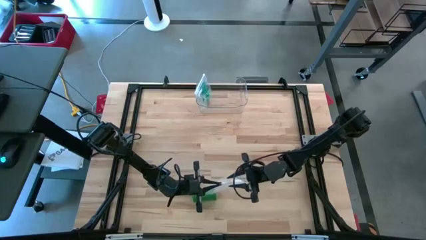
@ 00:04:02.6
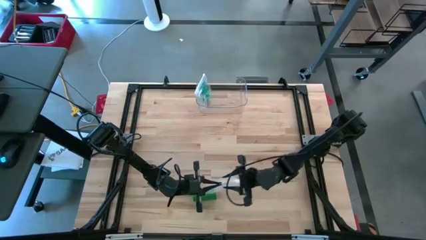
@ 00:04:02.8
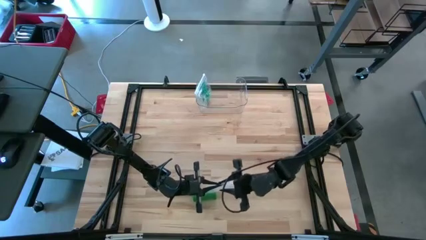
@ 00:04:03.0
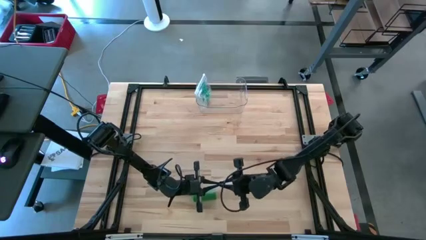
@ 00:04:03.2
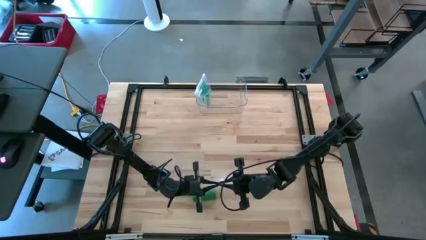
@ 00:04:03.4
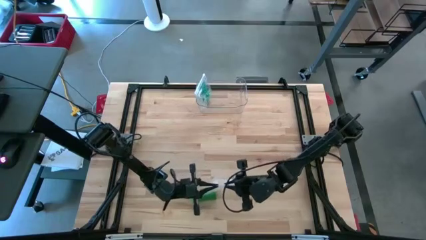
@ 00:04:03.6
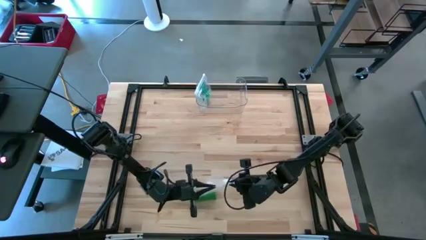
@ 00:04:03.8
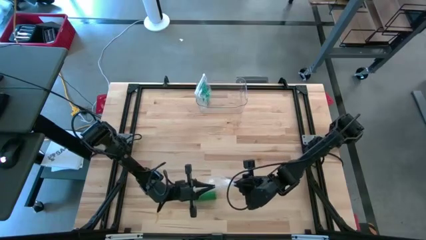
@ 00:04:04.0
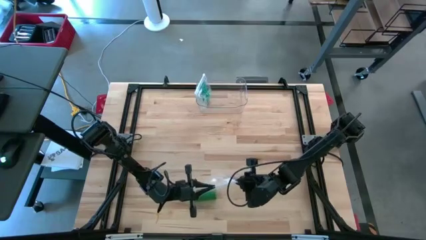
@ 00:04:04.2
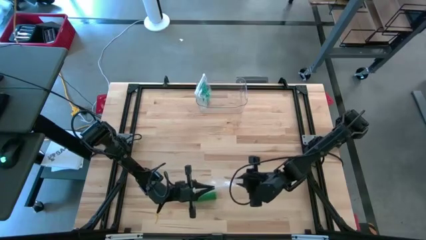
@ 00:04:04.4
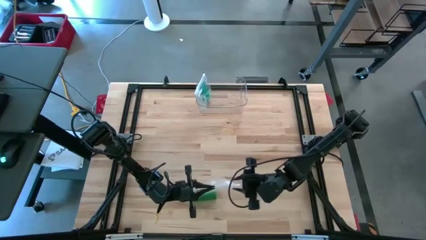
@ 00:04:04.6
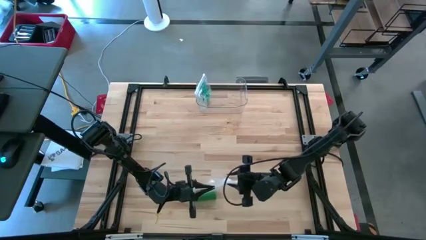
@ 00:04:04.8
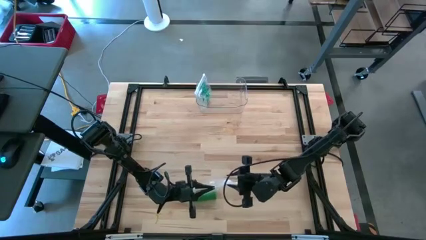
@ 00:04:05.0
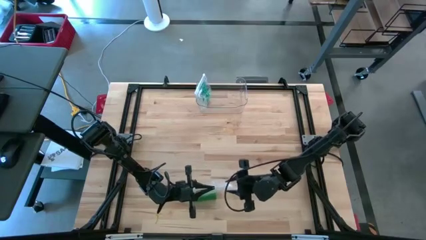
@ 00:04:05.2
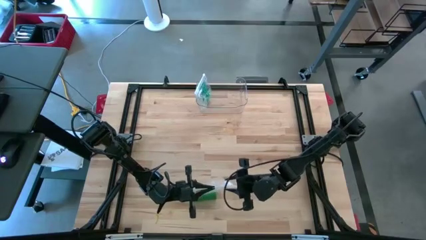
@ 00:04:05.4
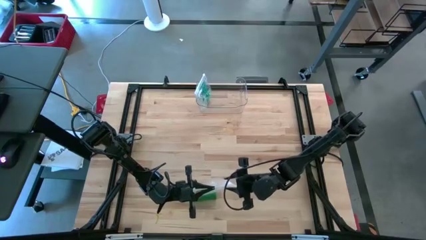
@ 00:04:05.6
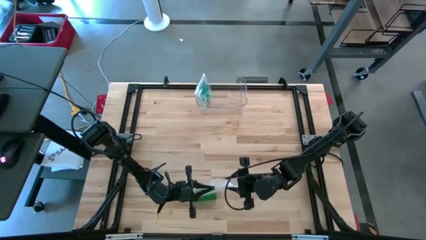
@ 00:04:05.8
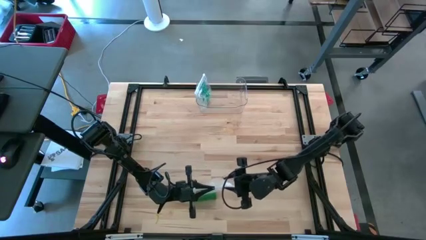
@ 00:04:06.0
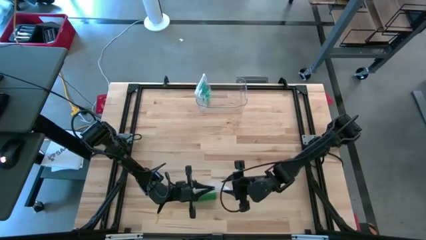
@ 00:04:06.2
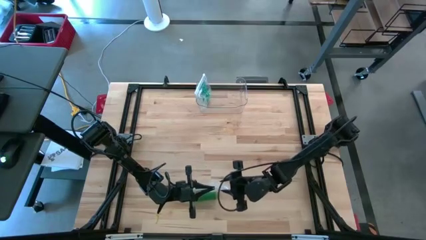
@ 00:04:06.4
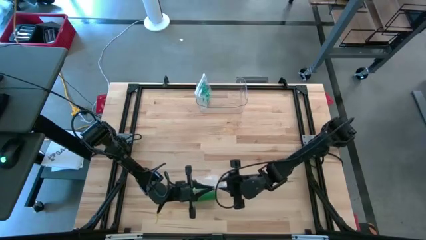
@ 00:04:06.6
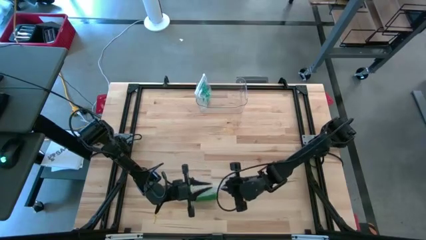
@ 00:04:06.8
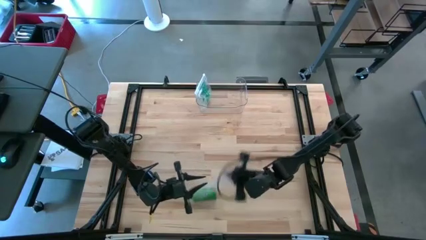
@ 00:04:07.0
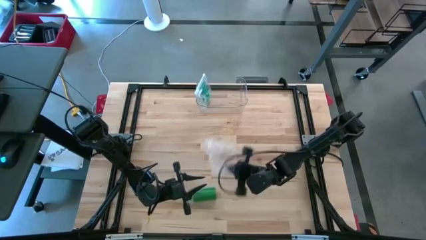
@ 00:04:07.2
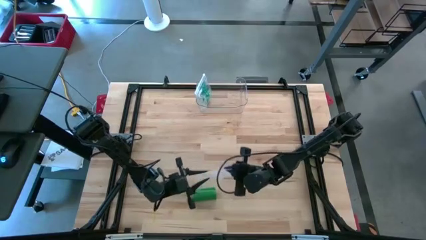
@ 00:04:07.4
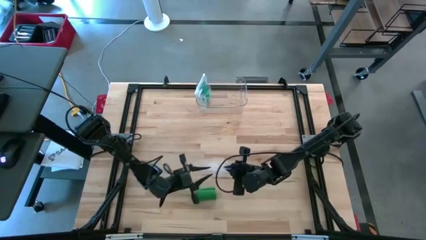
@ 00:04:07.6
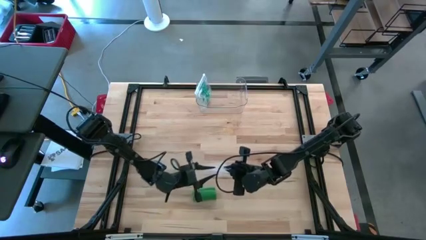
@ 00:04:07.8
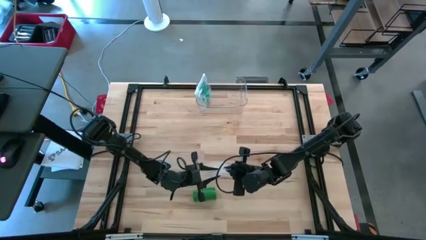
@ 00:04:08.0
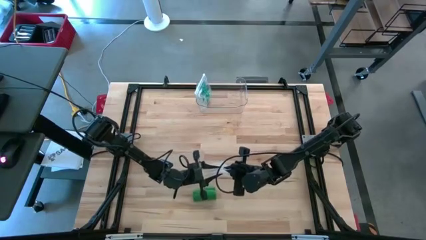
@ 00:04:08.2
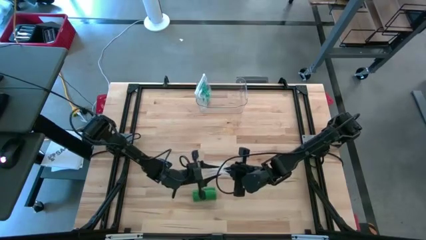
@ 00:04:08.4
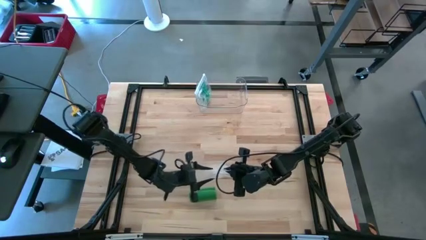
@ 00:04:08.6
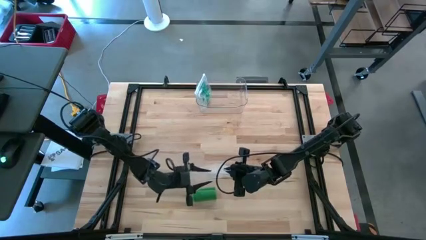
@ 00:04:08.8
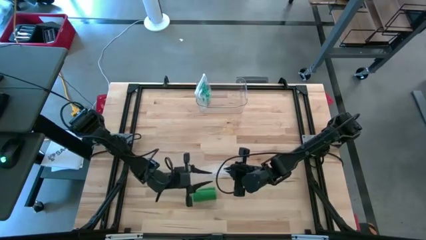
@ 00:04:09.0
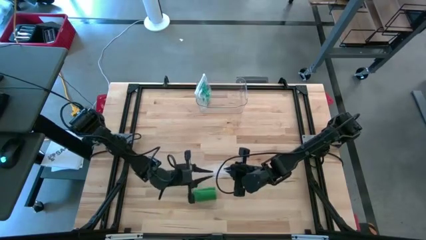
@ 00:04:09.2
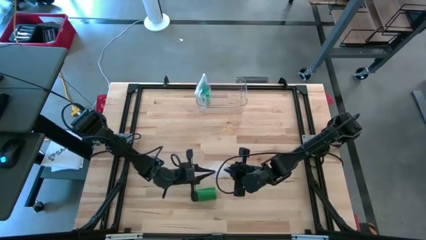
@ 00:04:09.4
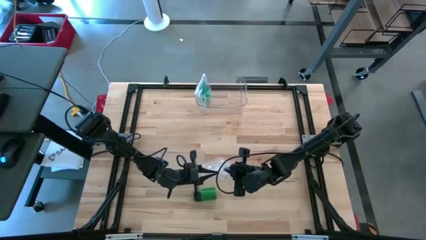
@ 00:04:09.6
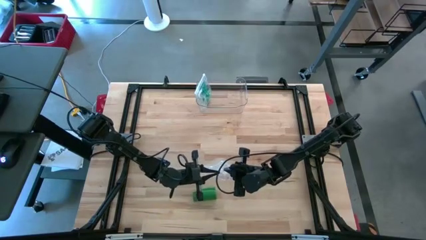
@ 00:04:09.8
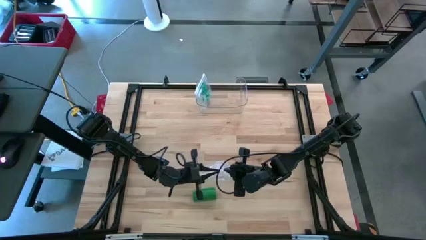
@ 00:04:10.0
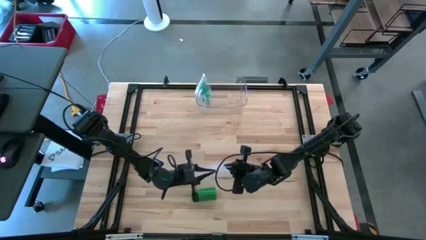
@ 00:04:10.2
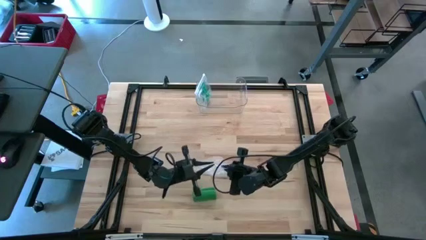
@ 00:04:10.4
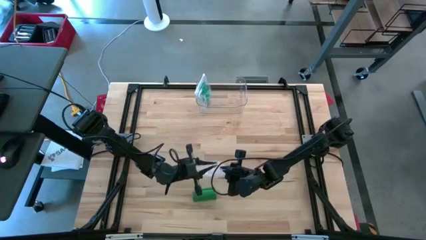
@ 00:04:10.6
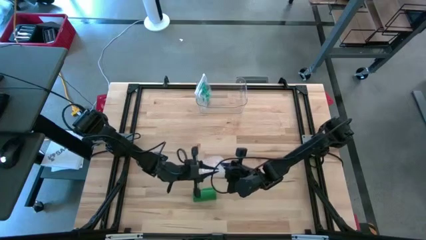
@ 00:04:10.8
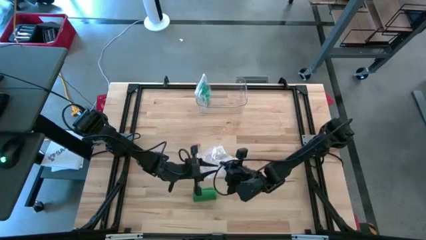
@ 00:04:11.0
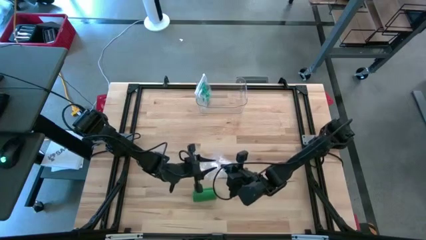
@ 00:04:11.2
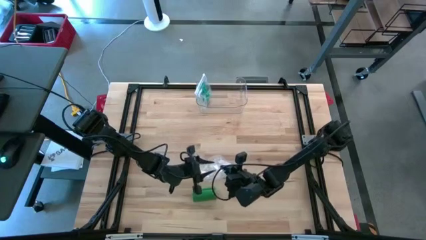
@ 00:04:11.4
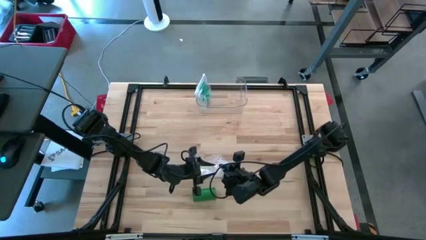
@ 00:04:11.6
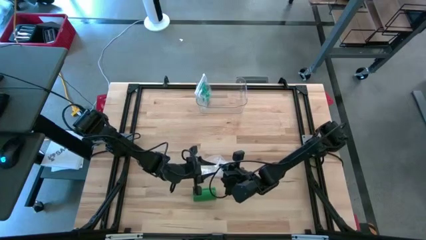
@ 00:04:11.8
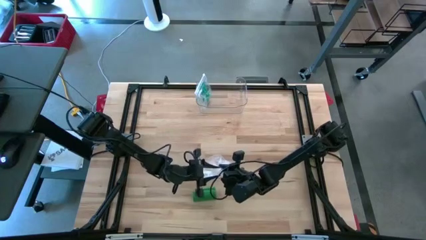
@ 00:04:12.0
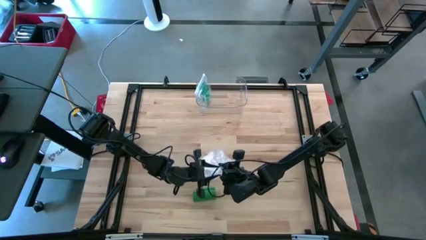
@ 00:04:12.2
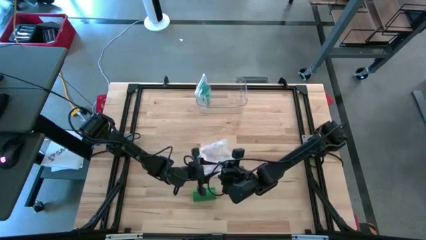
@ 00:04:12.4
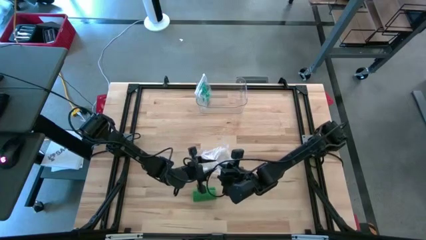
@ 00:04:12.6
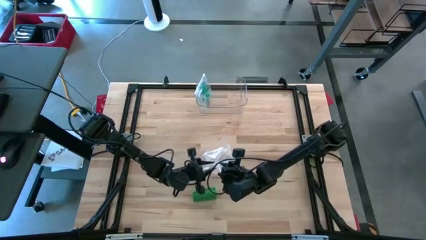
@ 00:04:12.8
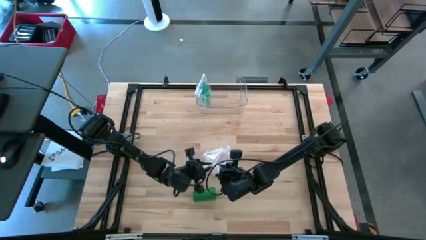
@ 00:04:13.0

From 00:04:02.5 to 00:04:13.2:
Task: Roll bandage
Open the transparent zip bag

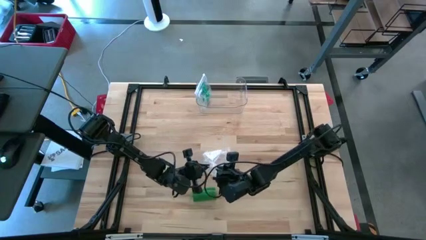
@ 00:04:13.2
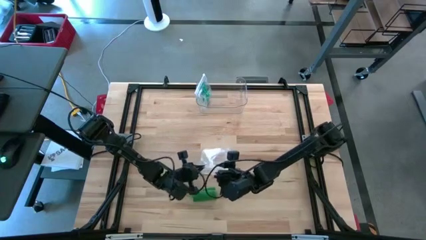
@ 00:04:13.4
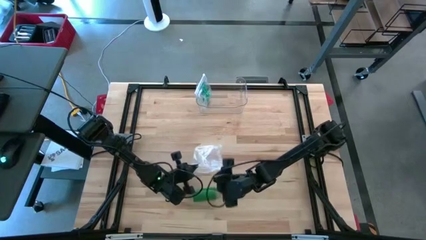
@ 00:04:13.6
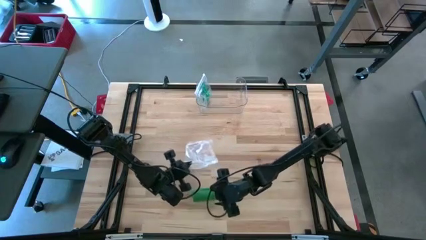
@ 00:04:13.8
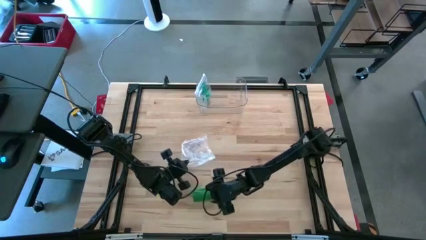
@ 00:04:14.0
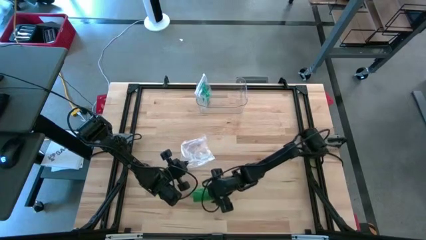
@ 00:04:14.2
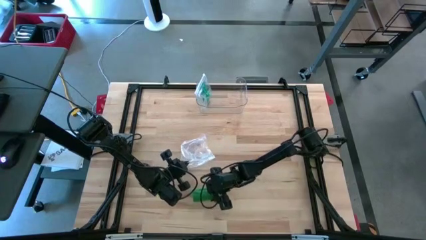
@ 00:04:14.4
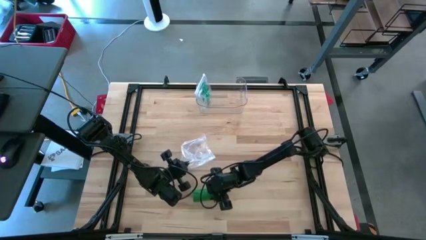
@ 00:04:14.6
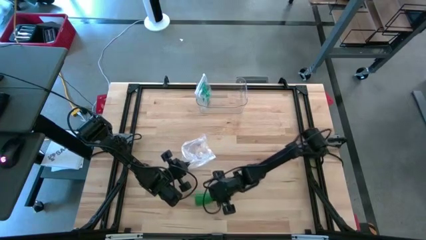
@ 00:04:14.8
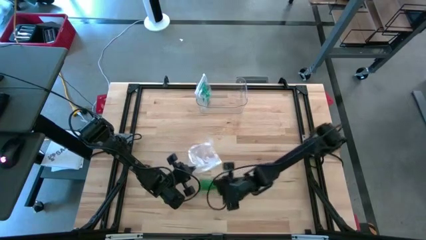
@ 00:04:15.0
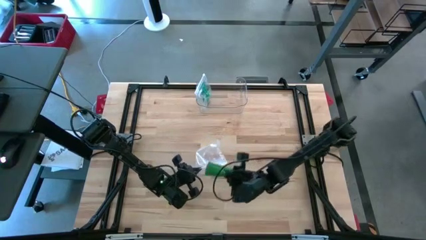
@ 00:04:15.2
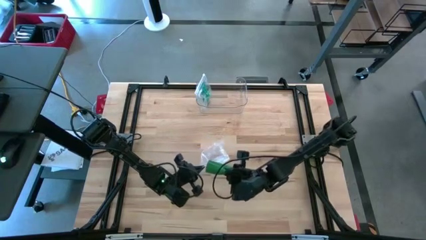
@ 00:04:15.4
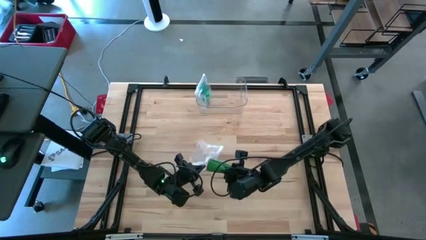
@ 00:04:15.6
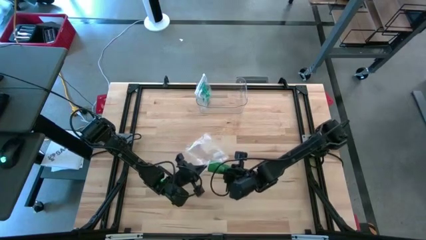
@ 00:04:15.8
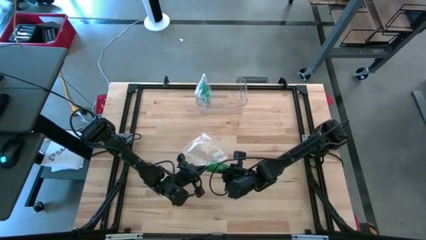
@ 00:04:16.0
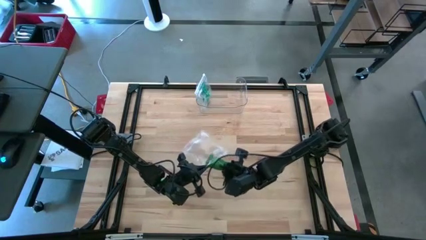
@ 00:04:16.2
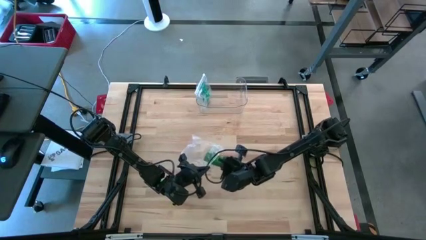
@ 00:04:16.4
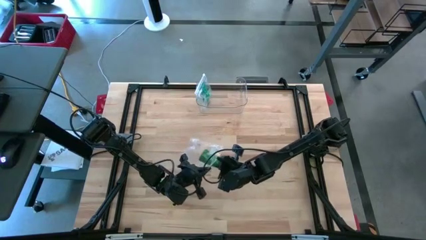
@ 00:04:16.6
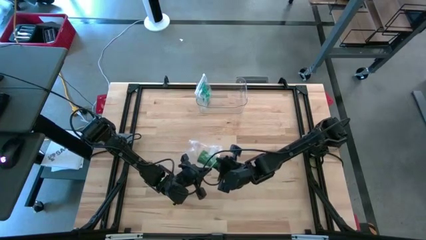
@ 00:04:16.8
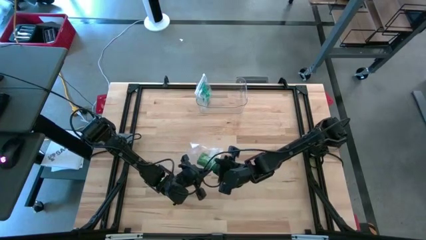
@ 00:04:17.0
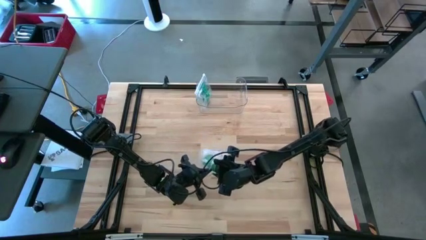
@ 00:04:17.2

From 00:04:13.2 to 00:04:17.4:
Put green bandage into transparent zip bag
